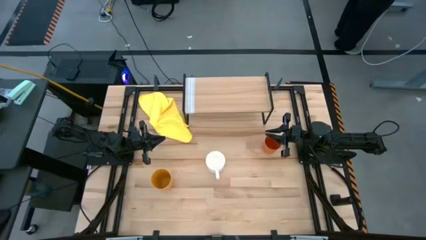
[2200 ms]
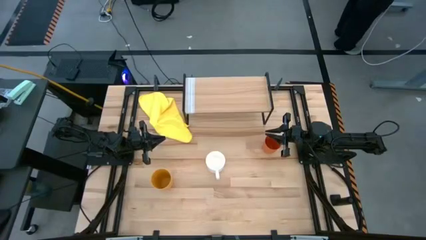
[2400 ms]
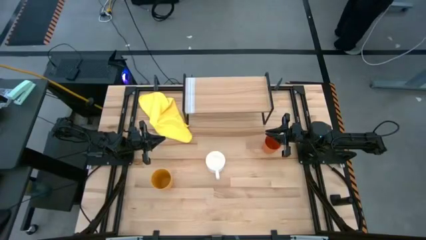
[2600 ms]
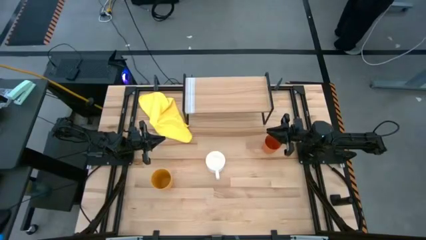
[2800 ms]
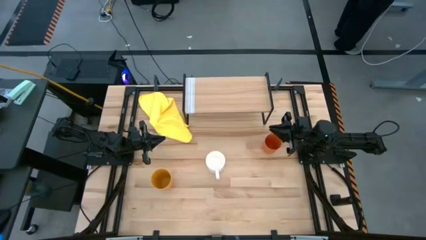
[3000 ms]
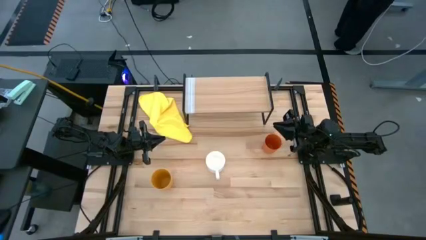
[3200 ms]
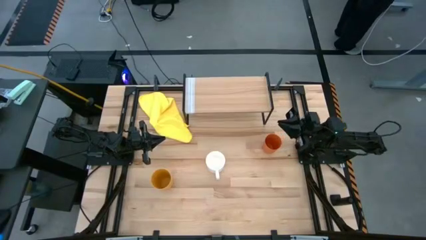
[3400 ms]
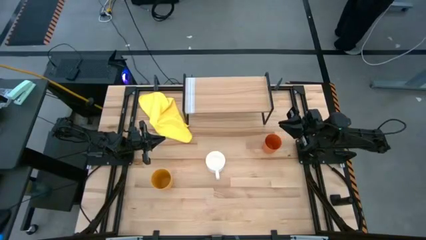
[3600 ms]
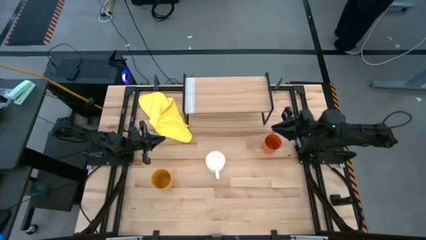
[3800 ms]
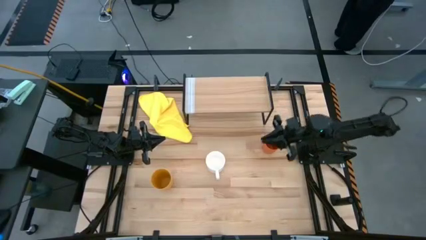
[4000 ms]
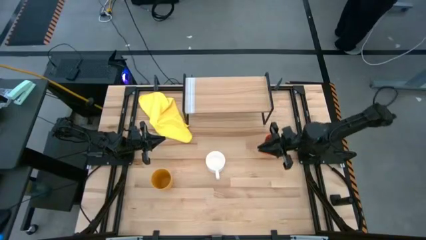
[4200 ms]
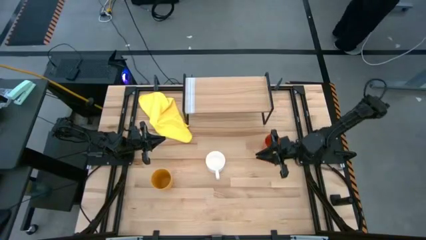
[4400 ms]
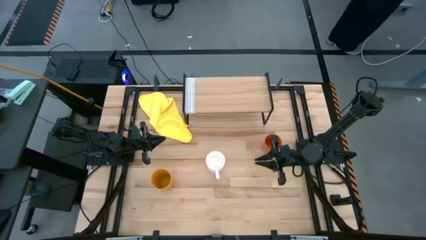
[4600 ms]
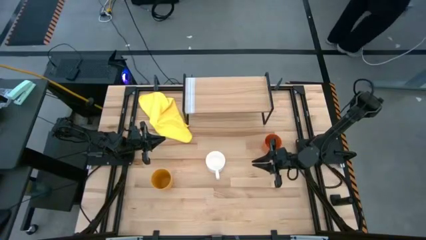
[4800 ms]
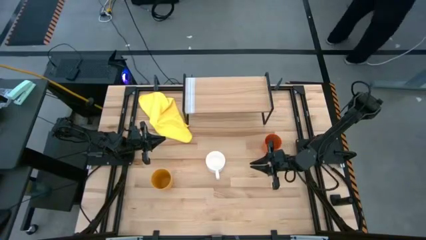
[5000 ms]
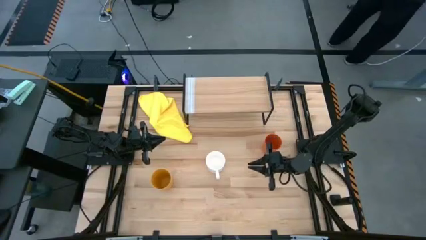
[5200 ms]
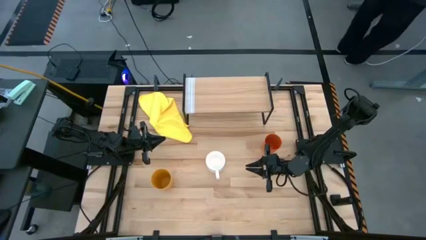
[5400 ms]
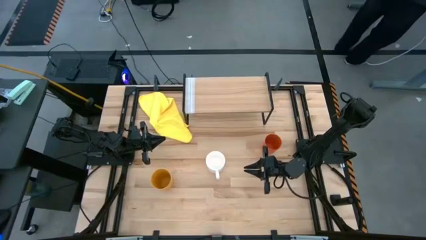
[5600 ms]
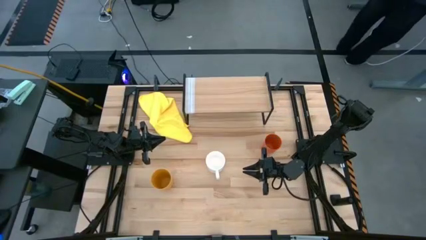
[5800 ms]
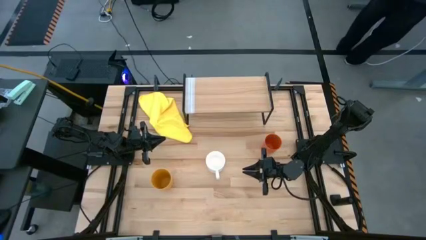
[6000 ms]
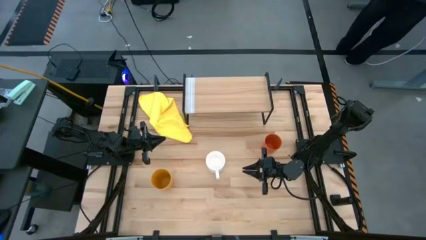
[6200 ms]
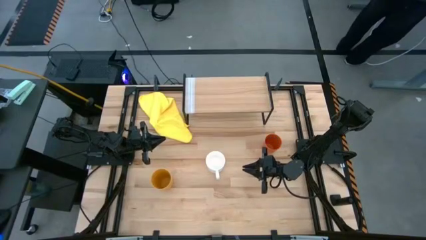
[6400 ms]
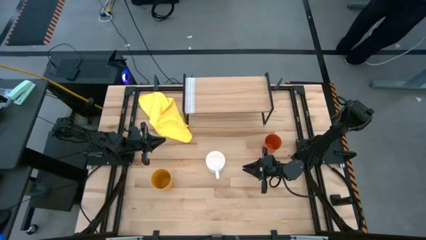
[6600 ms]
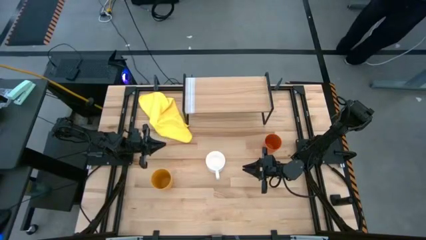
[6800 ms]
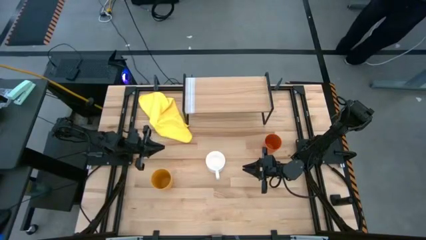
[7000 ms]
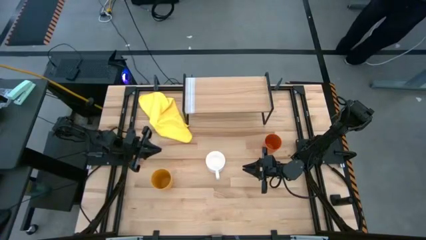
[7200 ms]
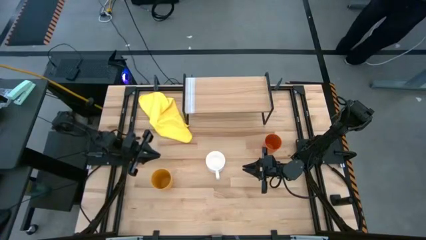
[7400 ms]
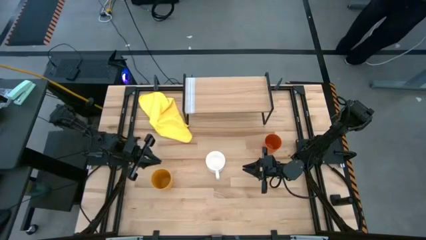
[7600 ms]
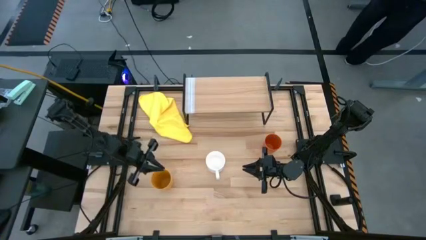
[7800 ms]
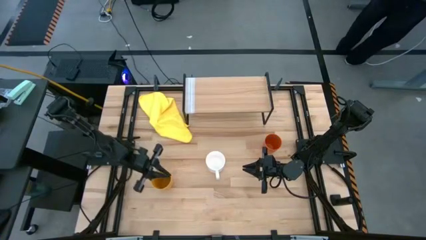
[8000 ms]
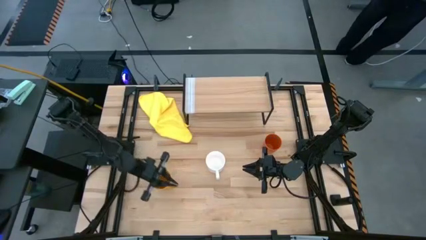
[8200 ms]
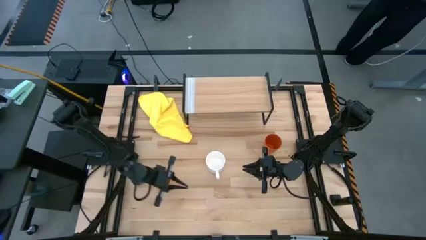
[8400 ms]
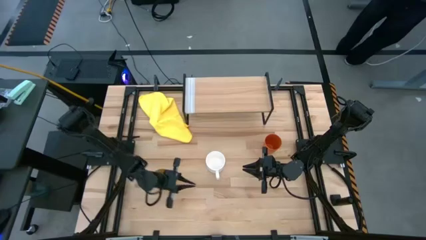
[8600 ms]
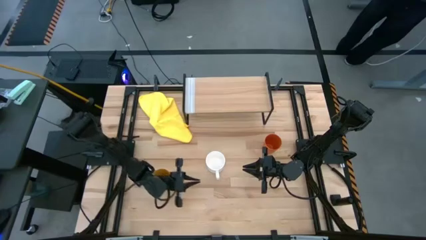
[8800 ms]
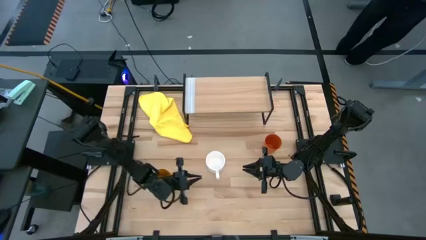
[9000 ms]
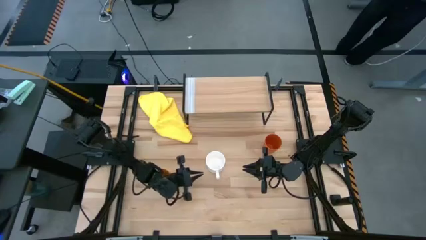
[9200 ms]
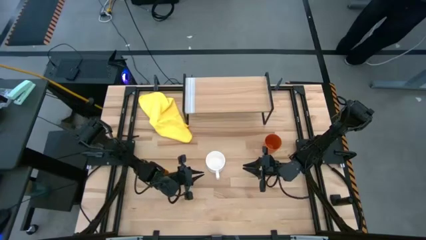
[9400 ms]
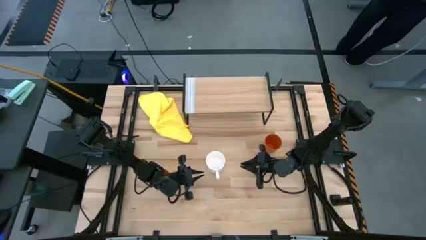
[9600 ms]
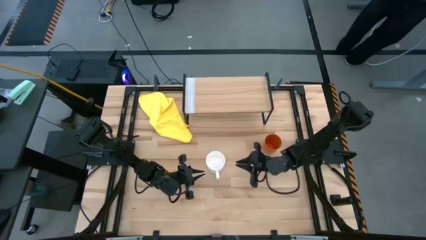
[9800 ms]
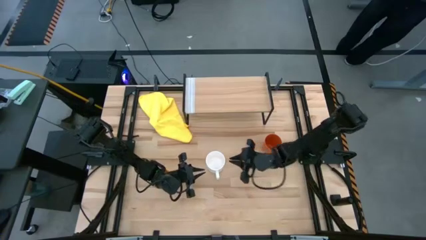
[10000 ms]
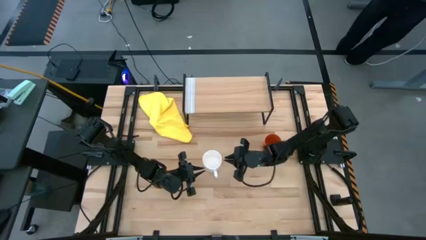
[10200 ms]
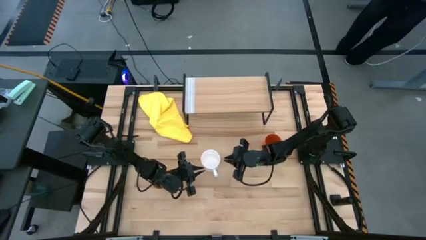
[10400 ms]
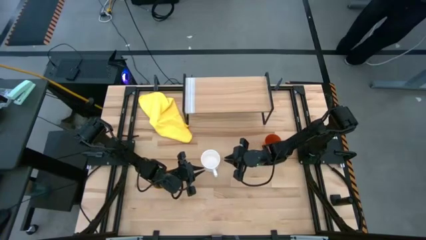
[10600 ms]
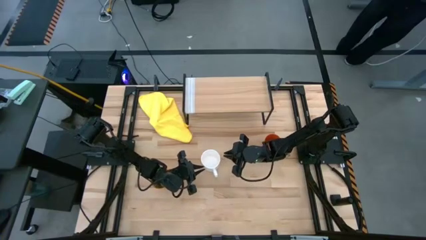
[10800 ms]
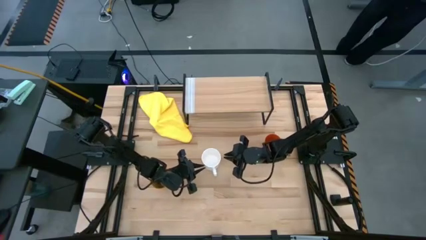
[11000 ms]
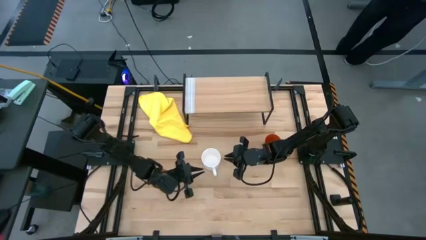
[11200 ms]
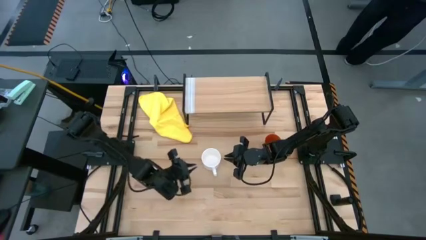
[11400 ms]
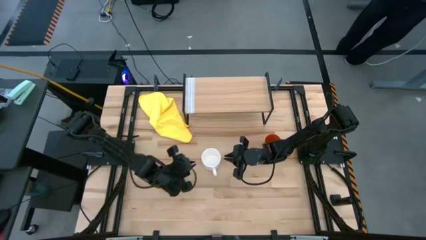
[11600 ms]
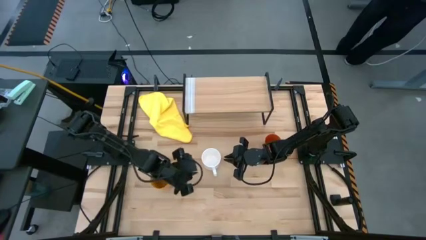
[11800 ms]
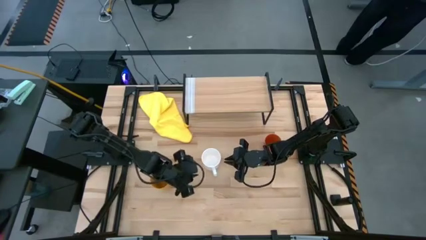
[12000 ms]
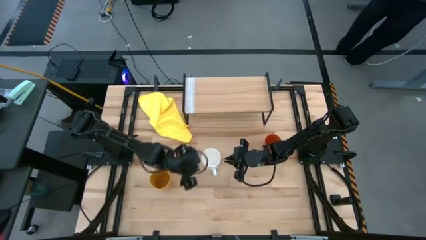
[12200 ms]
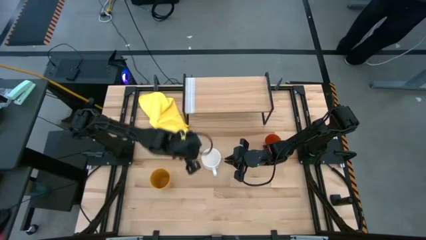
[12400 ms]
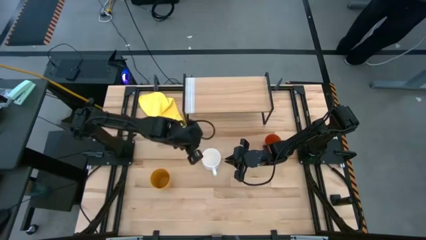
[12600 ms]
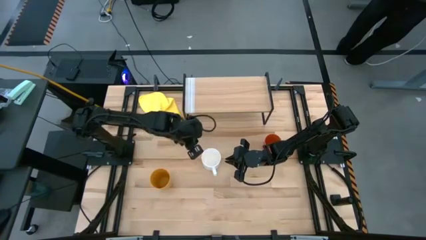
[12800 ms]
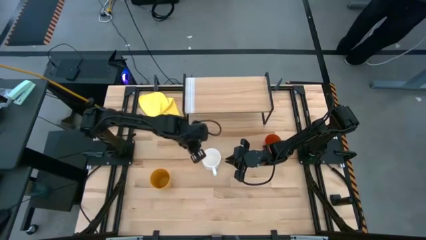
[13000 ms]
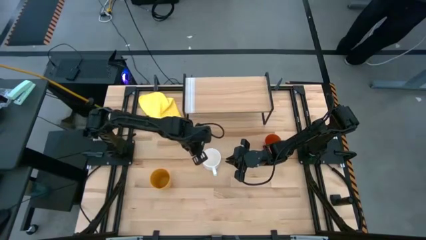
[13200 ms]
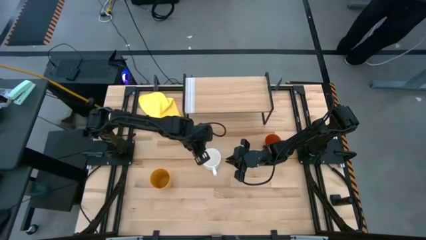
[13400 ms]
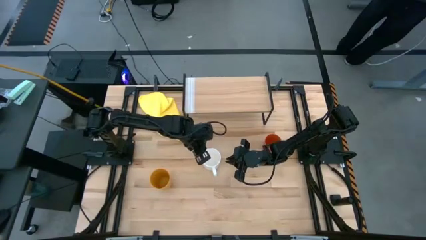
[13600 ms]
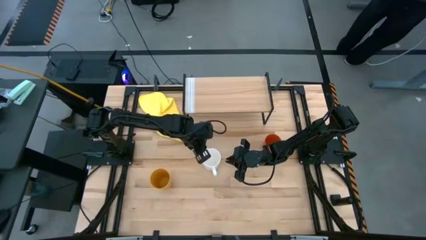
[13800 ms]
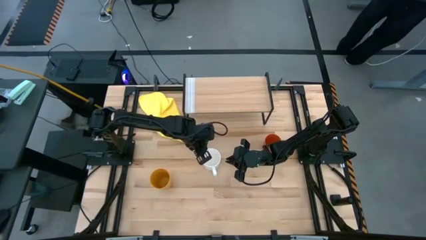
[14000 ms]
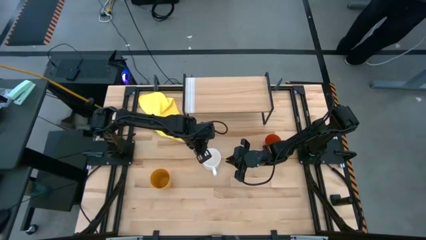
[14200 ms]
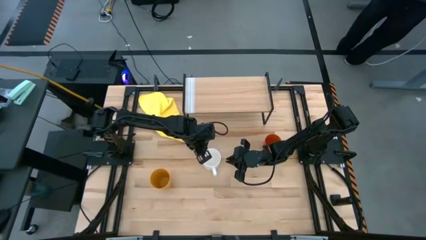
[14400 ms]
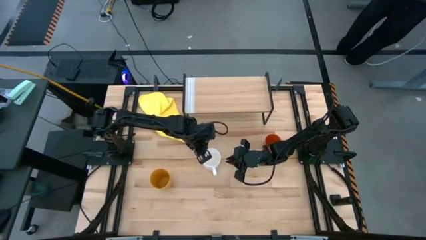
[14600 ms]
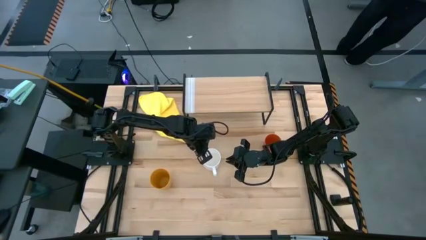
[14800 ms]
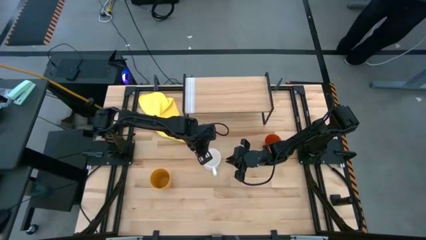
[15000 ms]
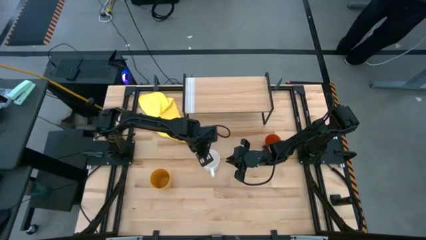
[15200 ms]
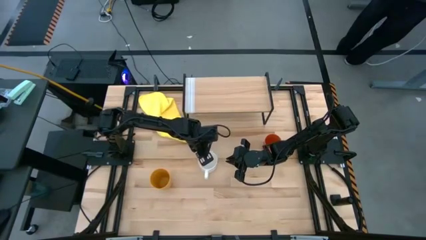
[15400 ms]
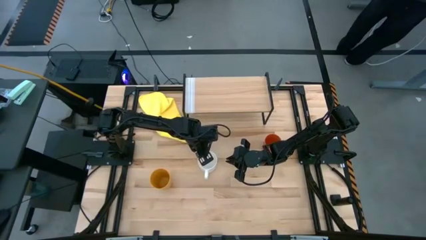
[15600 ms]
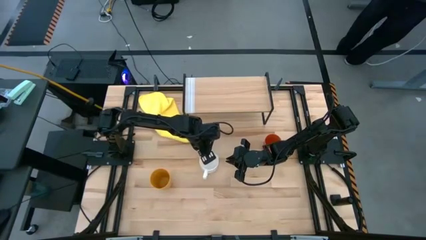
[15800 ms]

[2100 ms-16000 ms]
Task: Stack small to large cups/mugs on shelf
Put the white mug on the shelf
